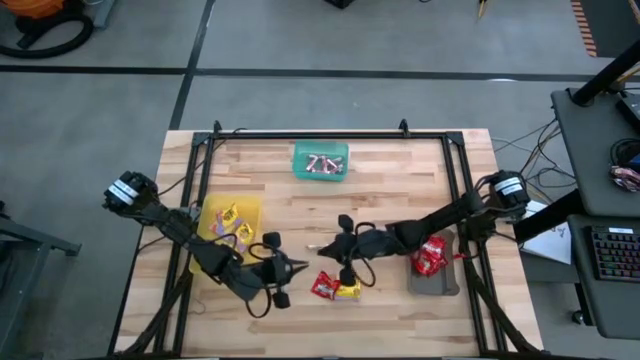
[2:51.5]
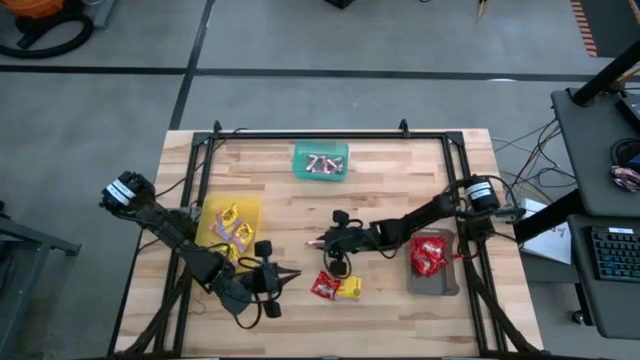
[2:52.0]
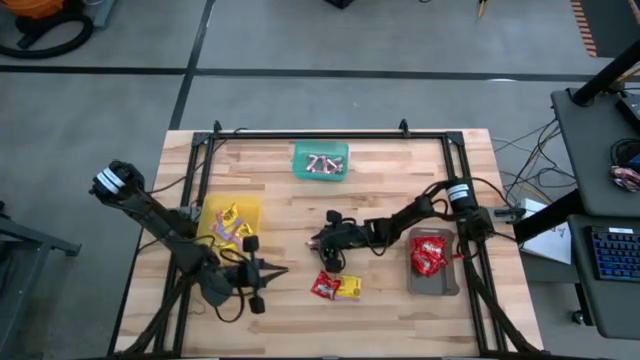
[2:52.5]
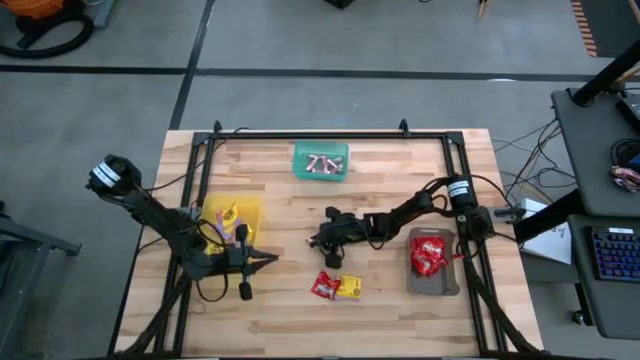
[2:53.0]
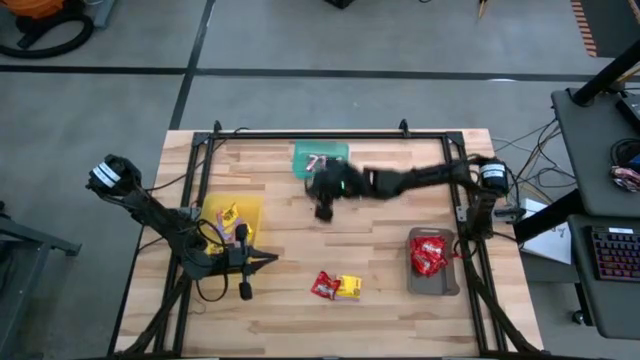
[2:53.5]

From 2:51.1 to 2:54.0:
Task: Sort candy
Put the white candy into the green bin

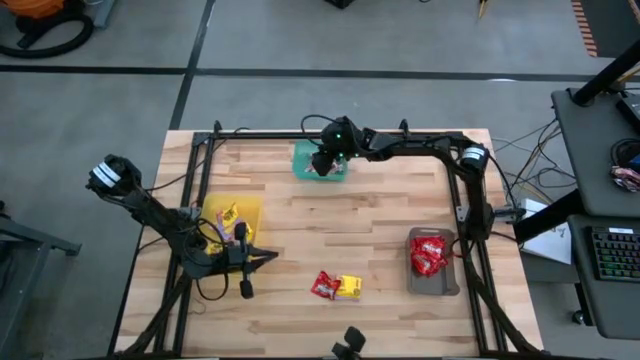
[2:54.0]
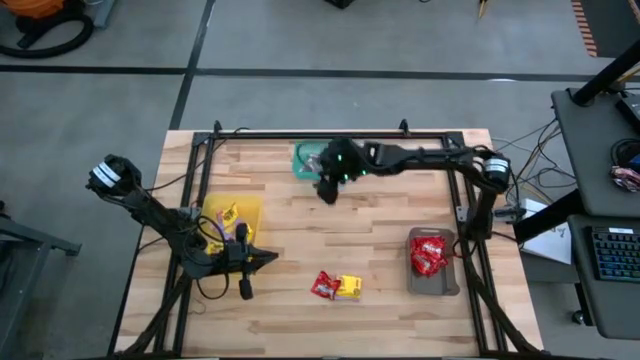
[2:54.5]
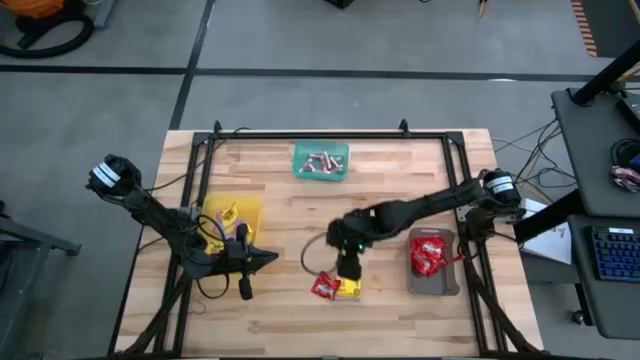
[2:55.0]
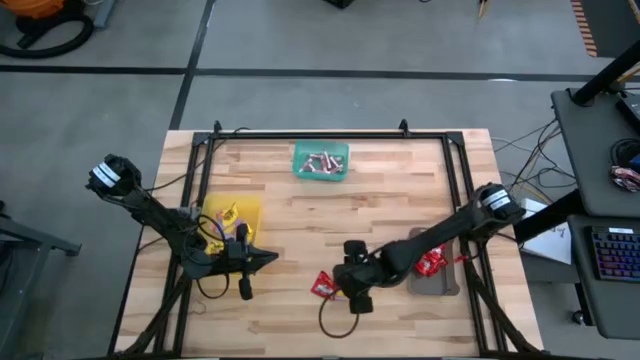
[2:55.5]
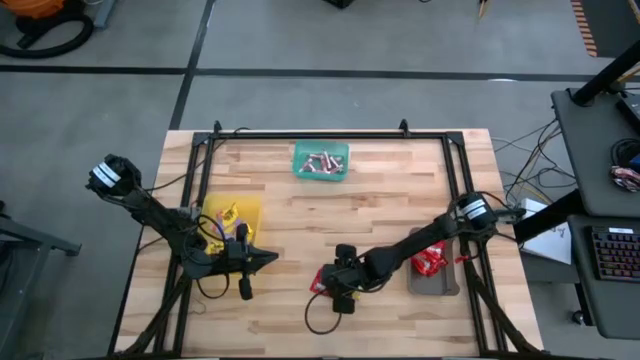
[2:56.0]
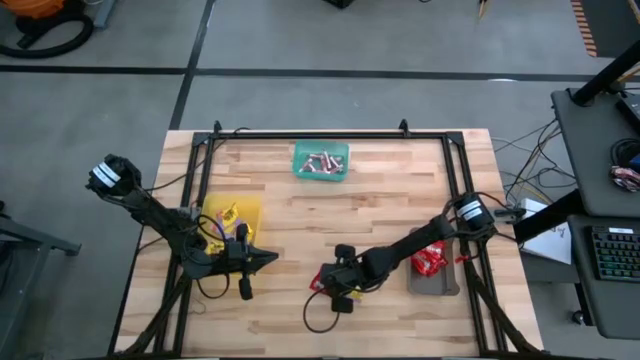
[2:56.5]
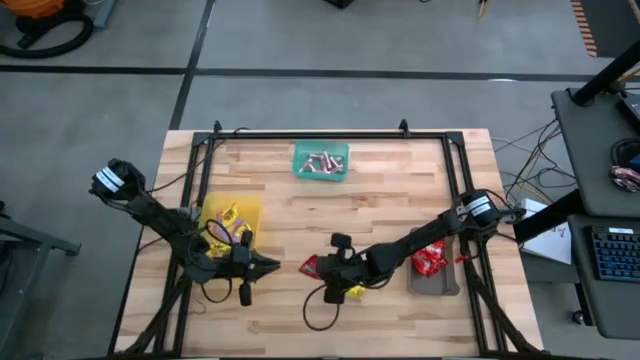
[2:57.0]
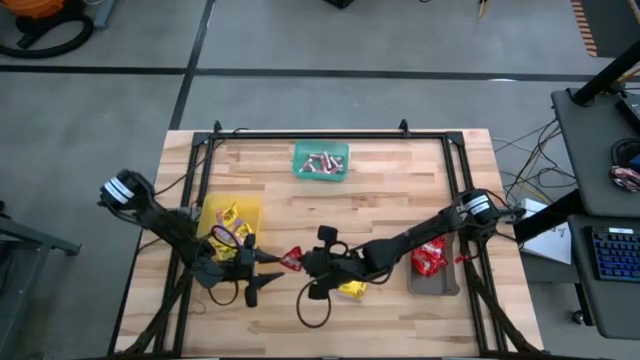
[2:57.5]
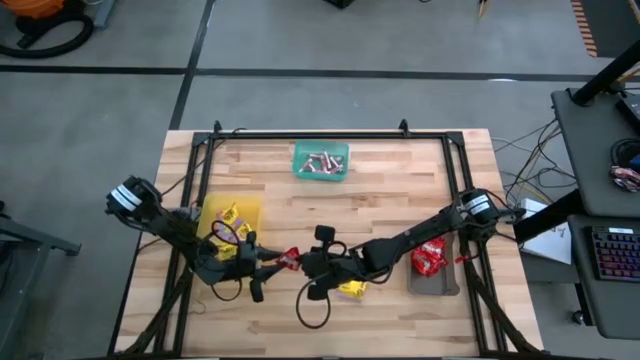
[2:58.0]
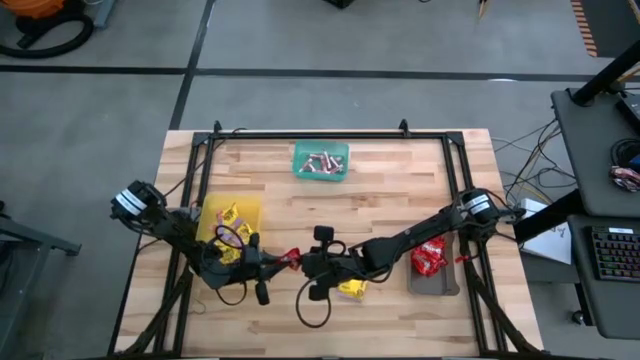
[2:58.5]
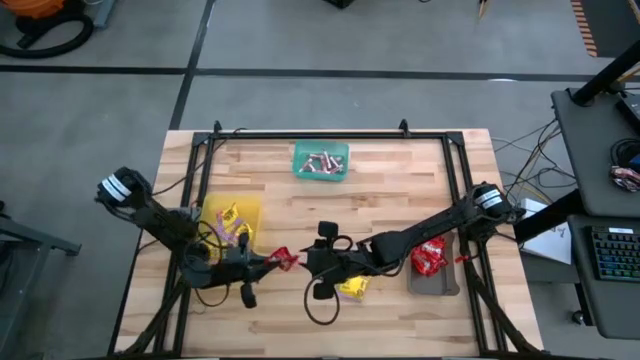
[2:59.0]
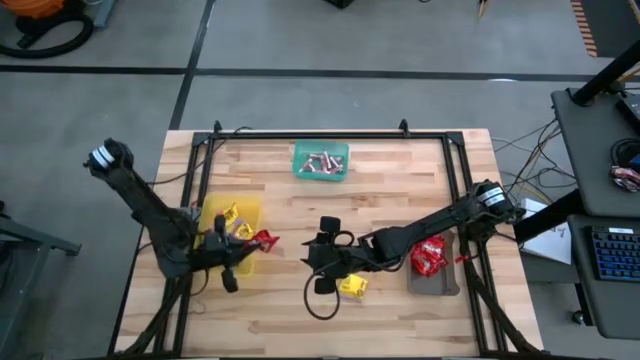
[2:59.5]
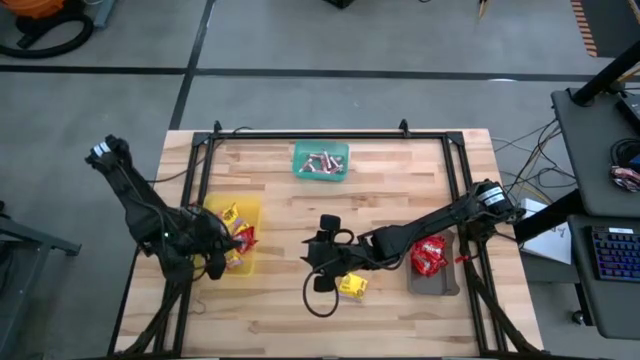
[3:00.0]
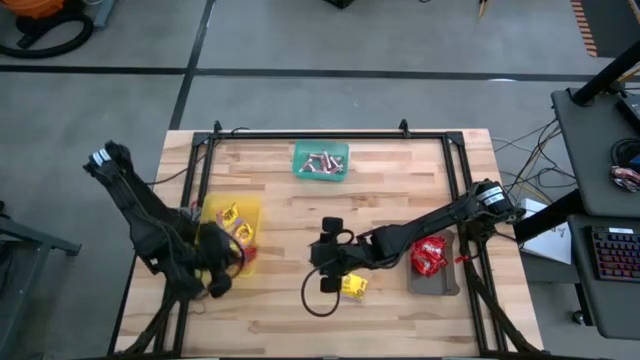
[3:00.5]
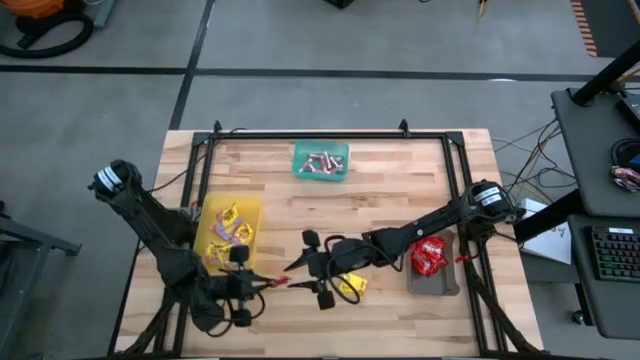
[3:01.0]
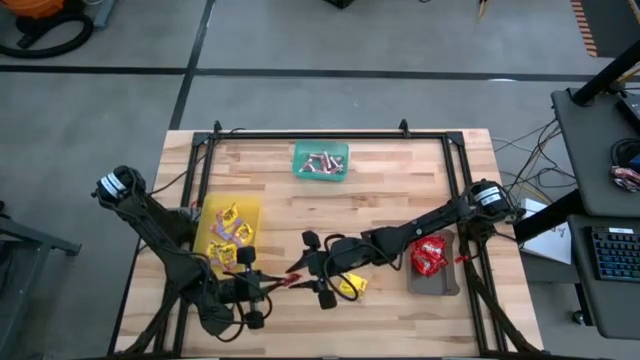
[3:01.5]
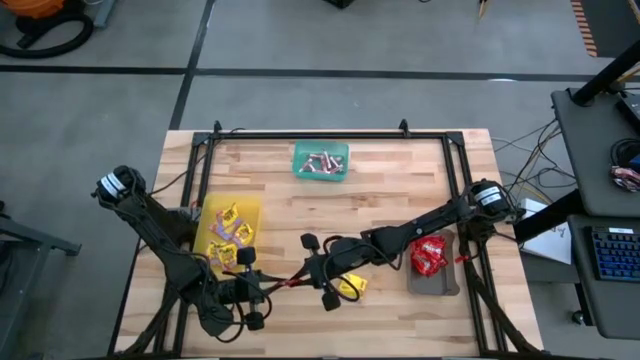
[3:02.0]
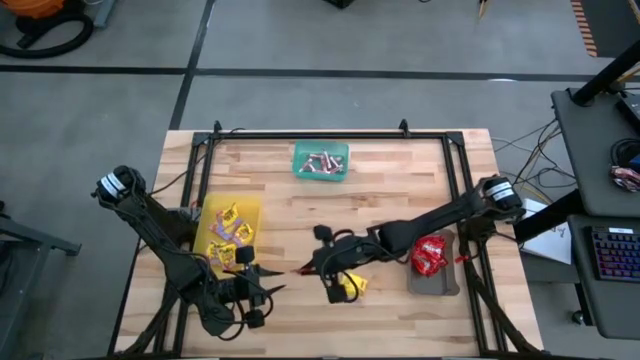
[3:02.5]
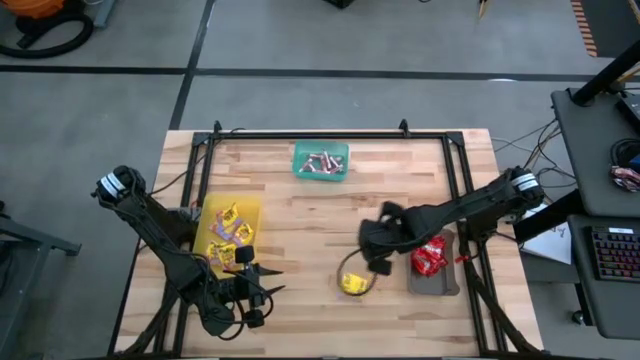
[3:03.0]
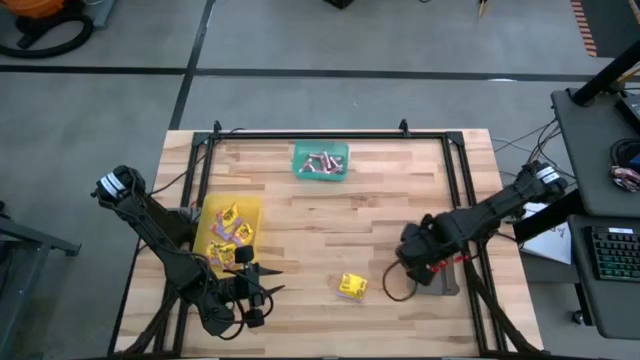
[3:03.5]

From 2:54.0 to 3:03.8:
Put the red candy into the black bin

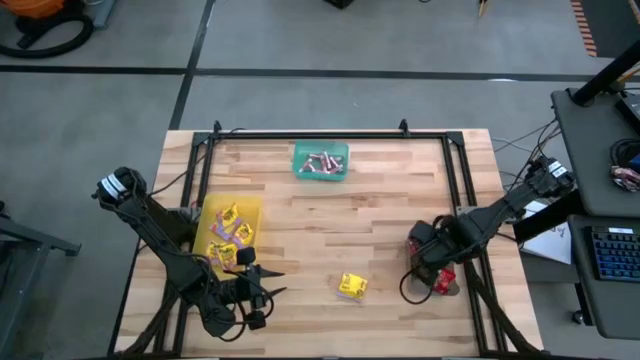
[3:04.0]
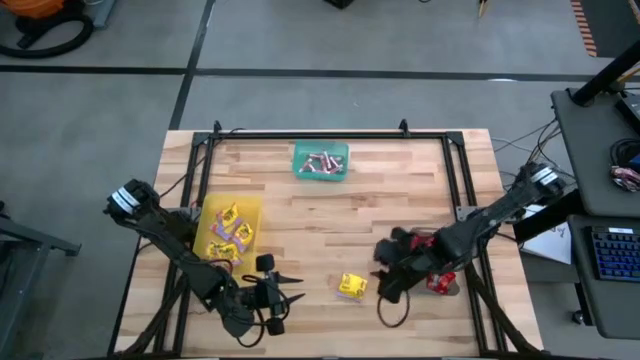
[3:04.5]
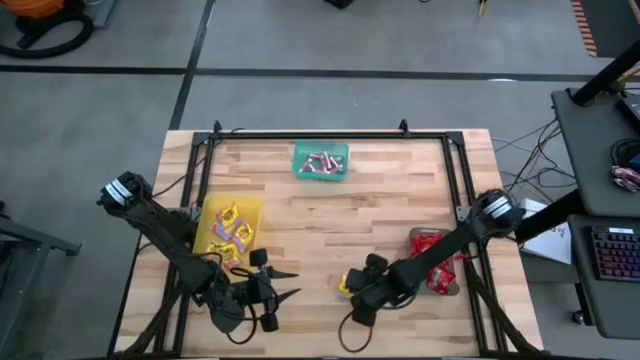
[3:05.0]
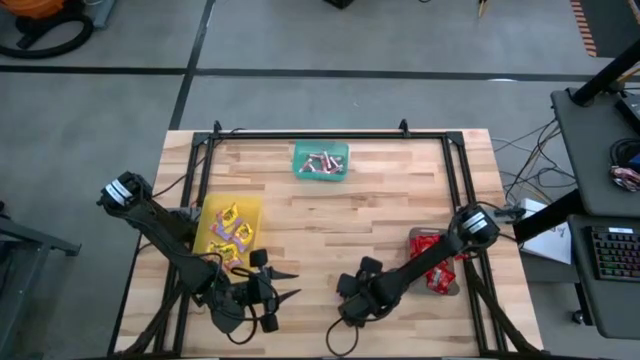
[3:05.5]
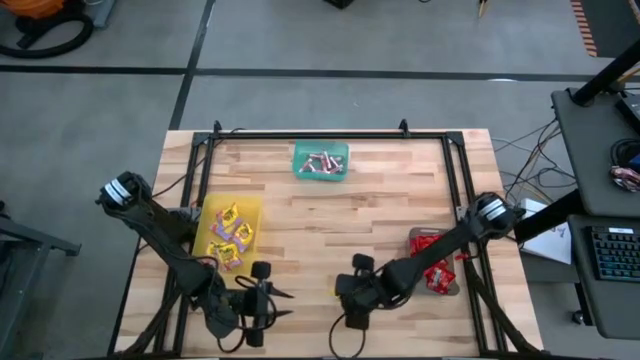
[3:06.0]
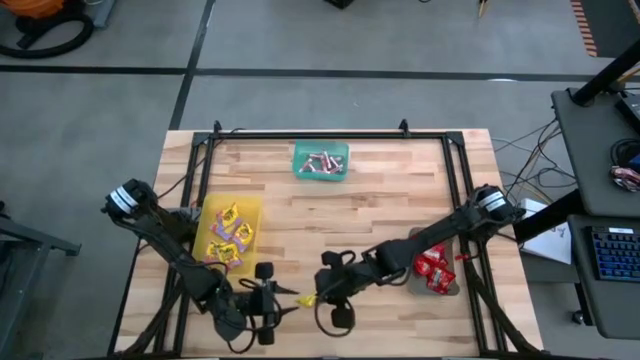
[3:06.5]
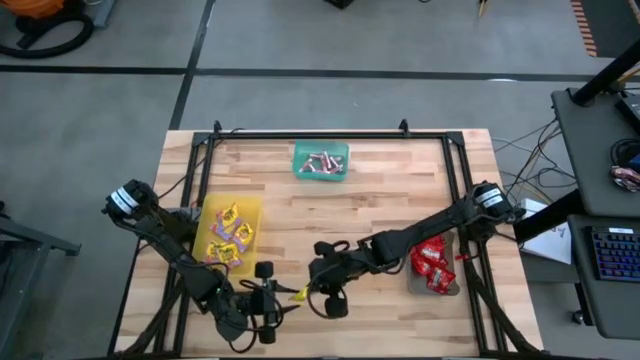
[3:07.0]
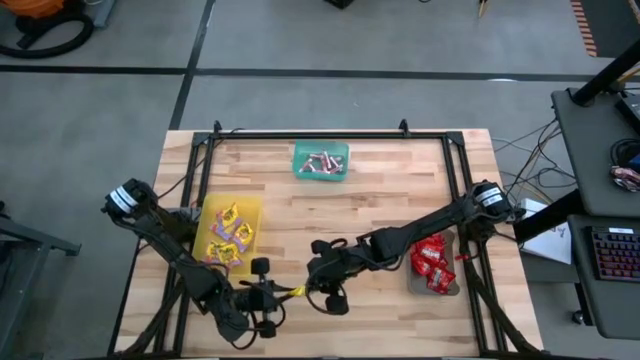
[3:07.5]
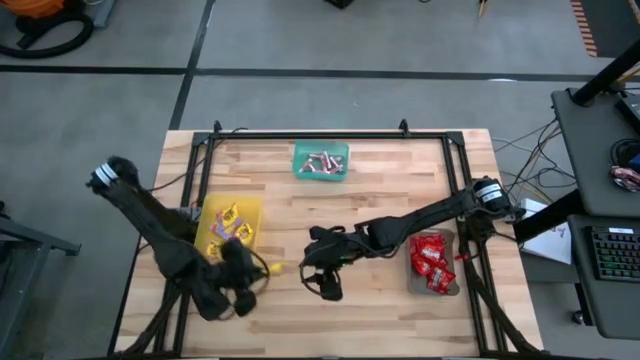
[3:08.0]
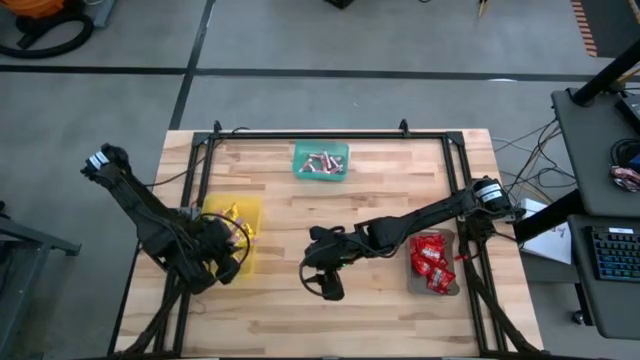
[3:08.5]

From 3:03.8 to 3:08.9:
Put the yellow candy into the yellow bin

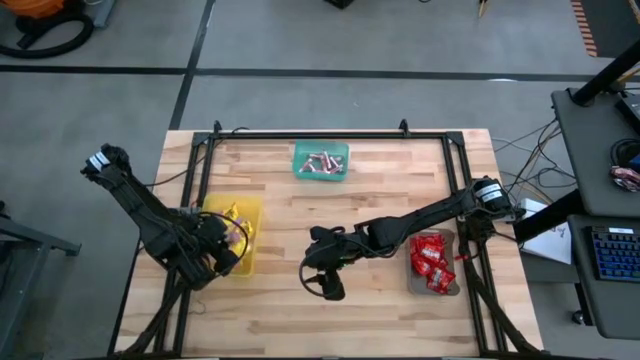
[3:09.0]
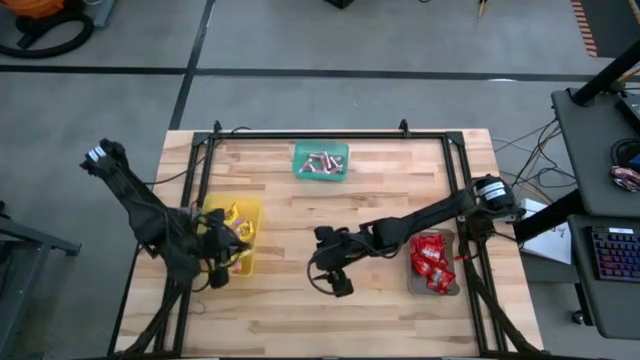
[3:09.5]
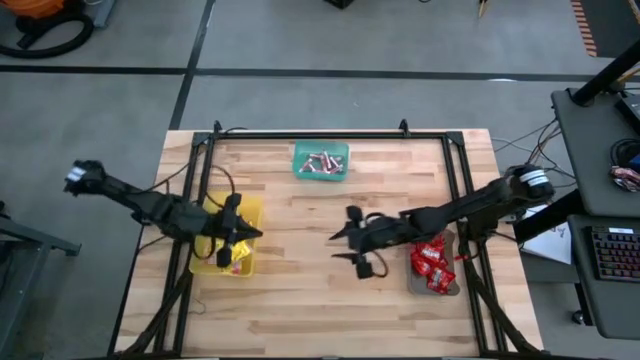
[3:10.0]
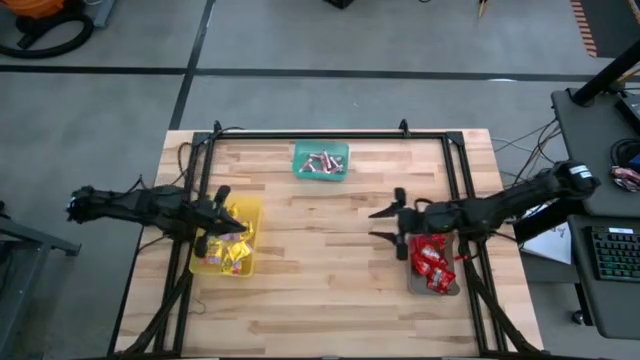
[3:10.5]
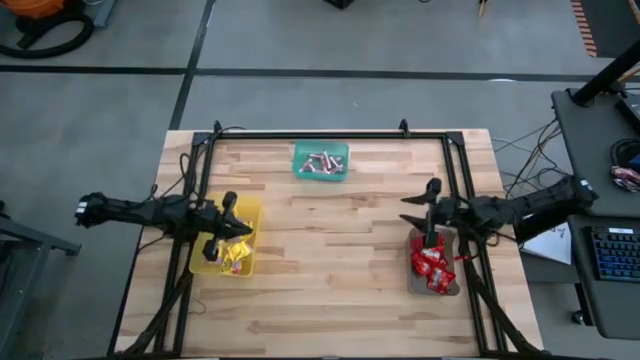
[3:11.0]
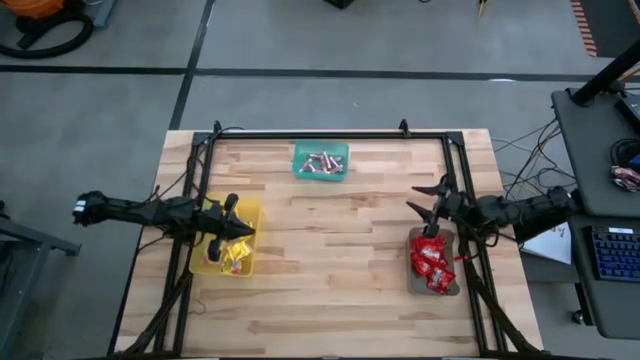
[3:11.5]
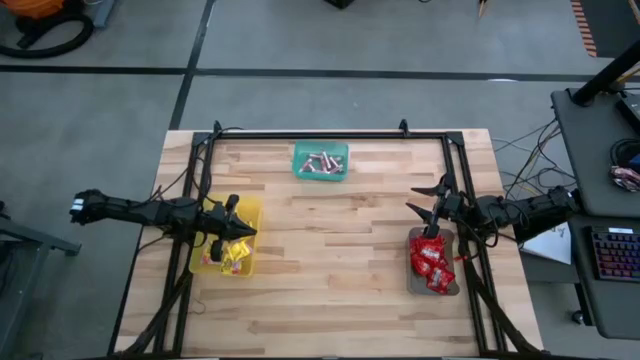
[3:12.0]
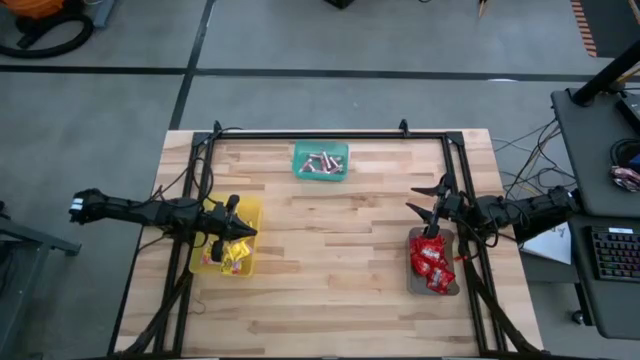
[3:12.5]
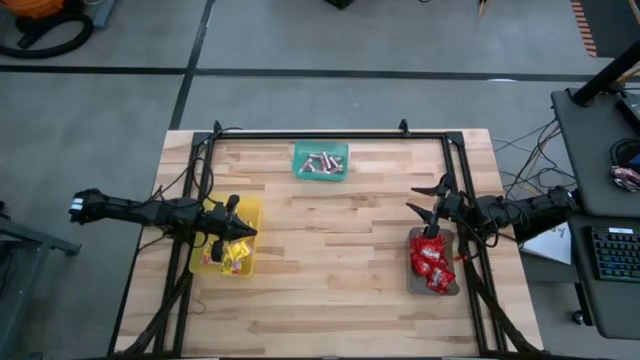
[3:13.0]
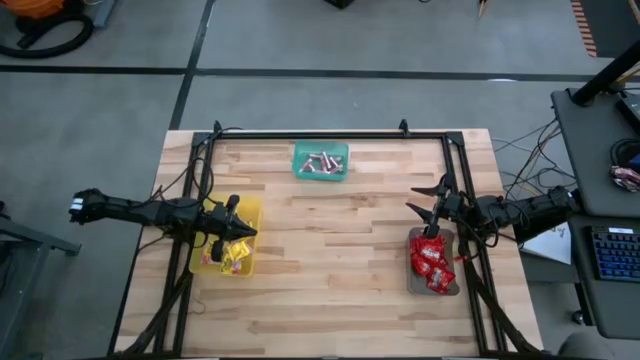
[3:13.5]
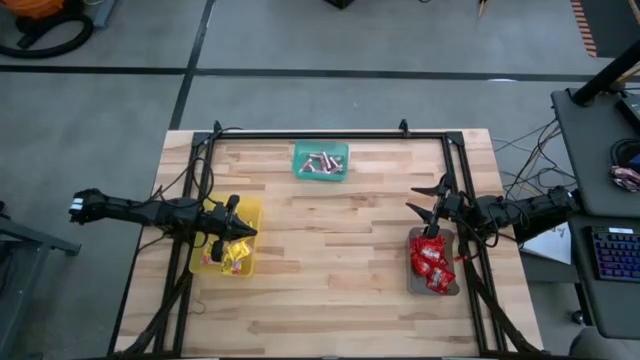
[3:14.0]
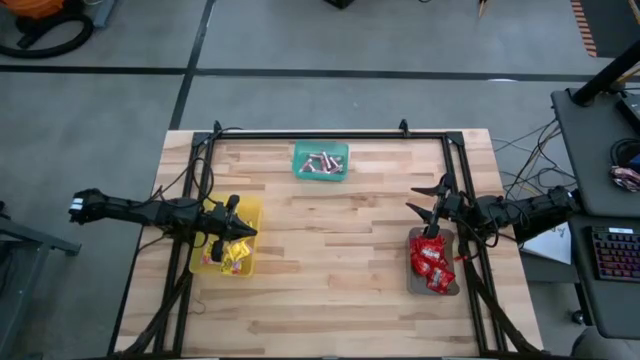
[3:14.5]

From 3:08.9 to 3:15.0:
Return to Home Position
